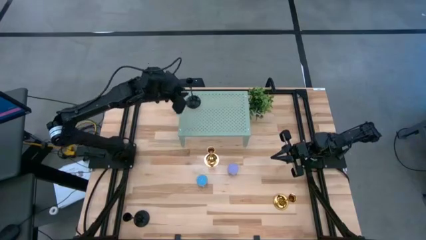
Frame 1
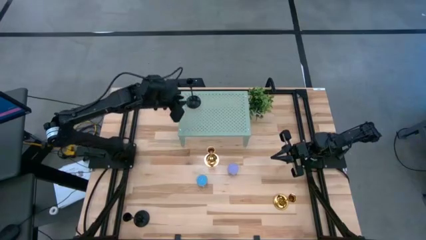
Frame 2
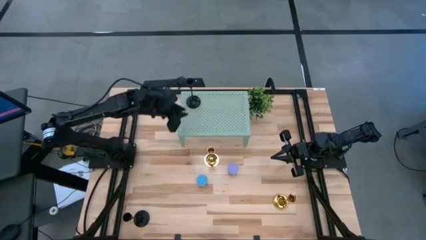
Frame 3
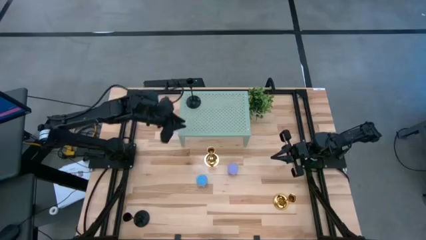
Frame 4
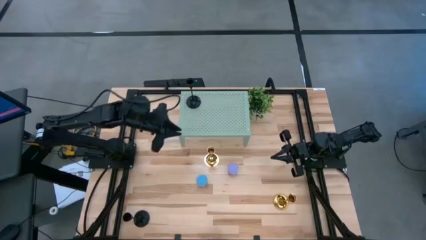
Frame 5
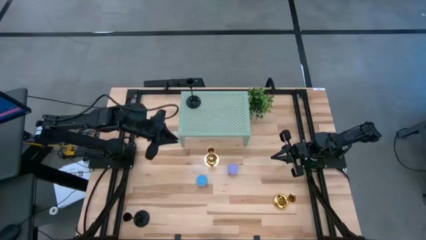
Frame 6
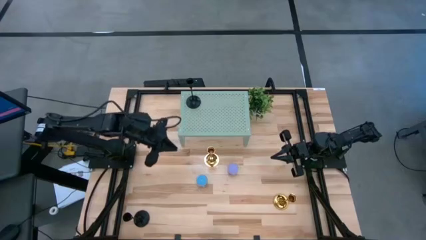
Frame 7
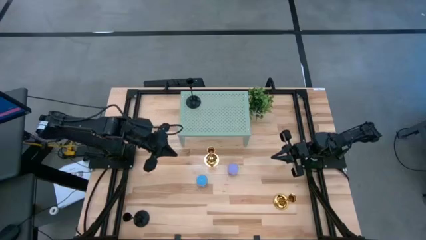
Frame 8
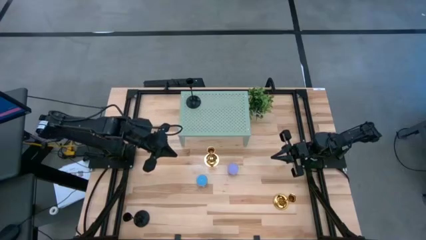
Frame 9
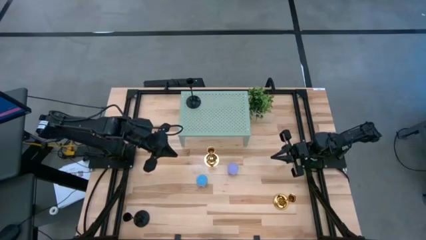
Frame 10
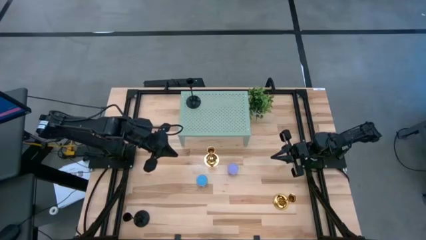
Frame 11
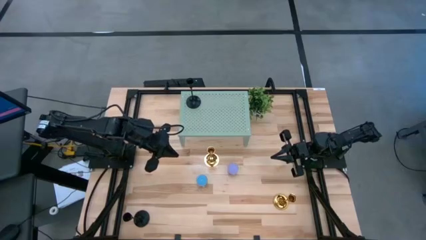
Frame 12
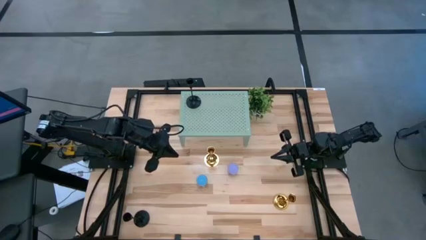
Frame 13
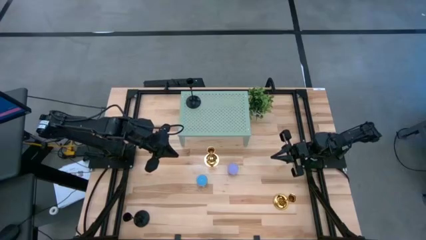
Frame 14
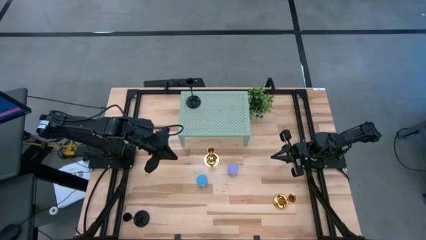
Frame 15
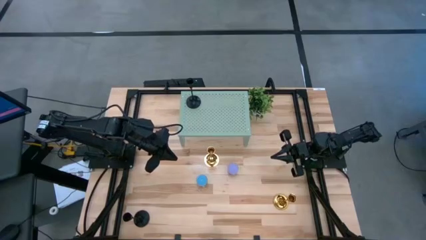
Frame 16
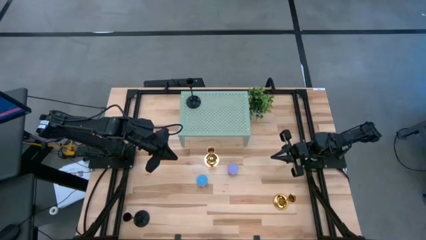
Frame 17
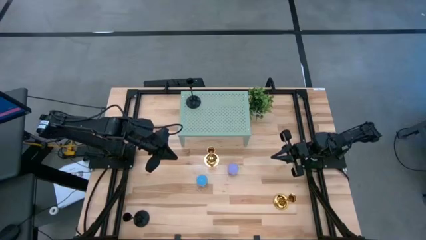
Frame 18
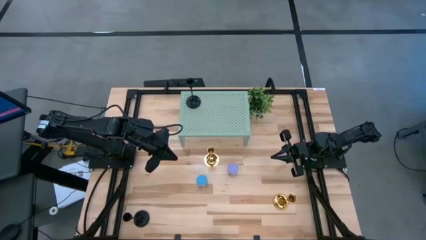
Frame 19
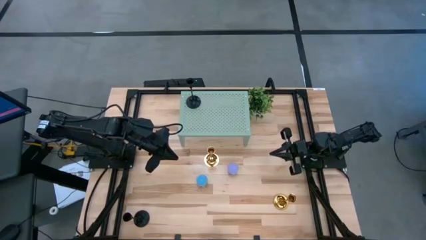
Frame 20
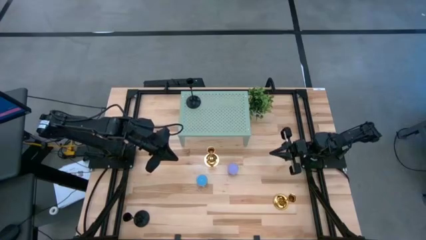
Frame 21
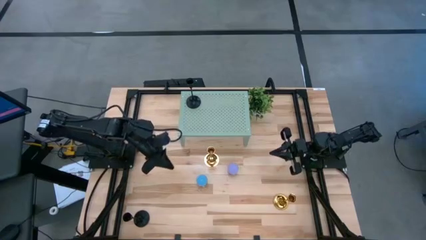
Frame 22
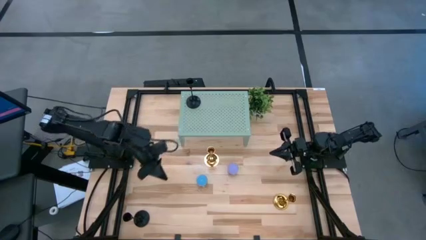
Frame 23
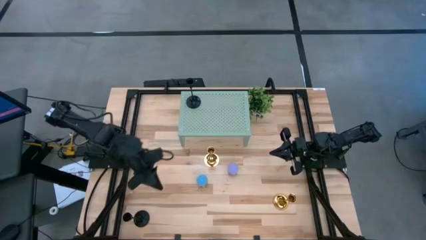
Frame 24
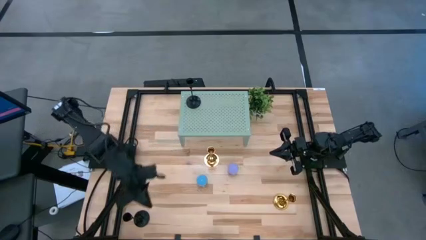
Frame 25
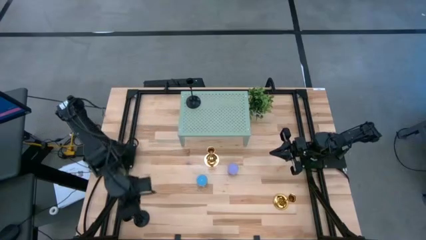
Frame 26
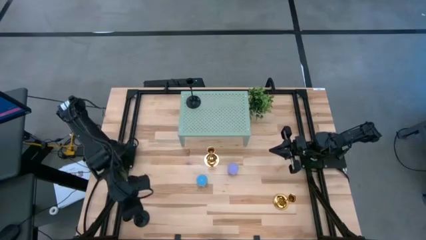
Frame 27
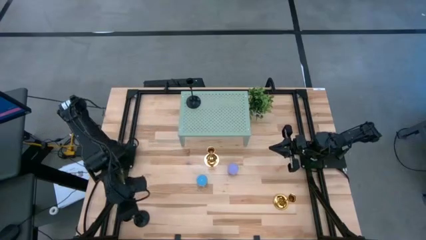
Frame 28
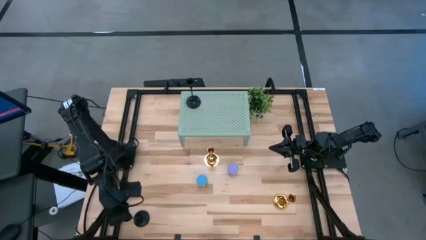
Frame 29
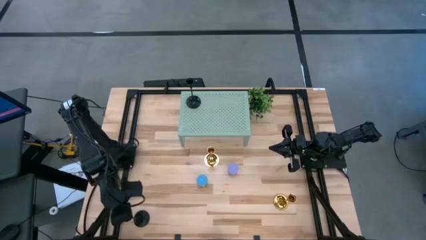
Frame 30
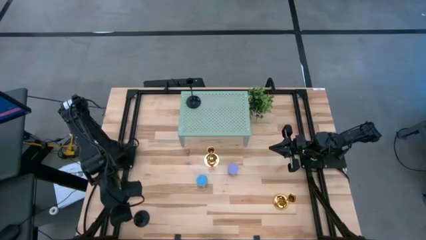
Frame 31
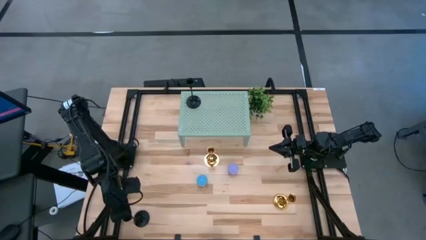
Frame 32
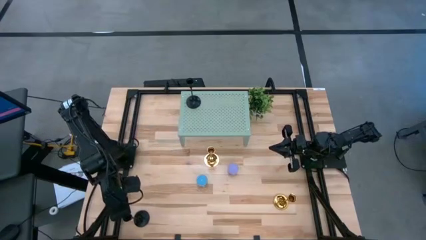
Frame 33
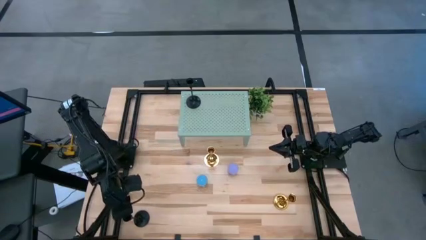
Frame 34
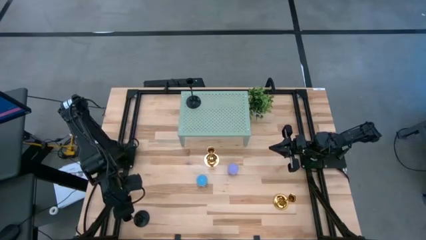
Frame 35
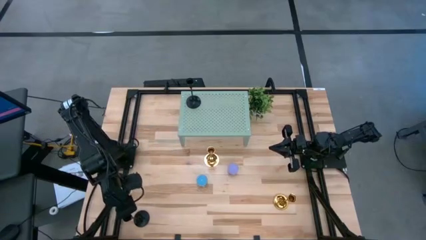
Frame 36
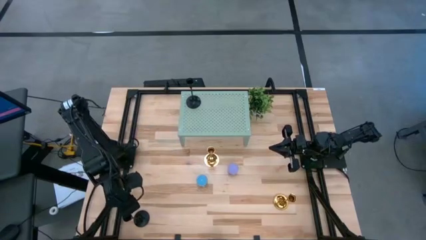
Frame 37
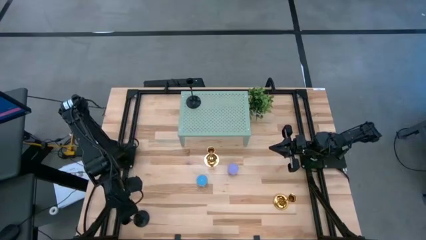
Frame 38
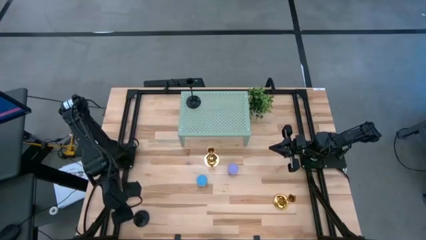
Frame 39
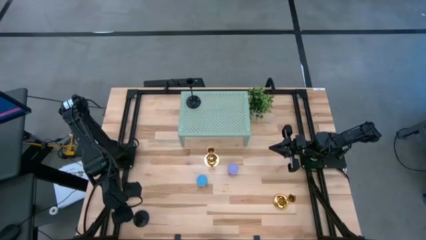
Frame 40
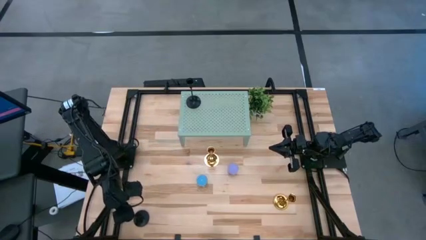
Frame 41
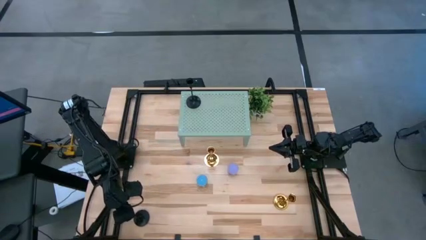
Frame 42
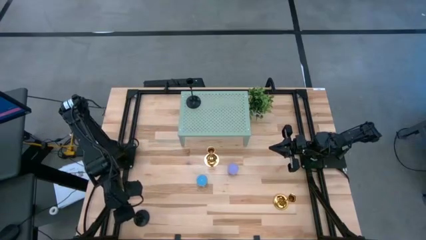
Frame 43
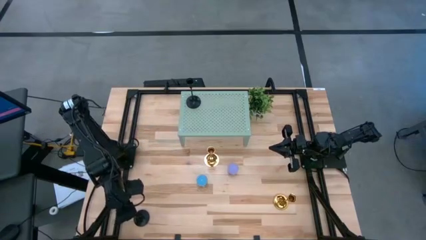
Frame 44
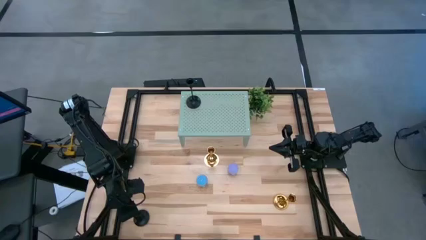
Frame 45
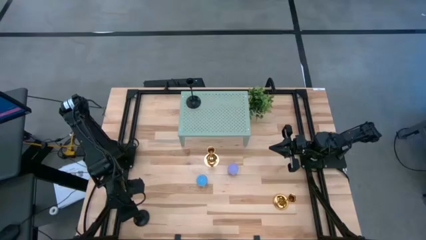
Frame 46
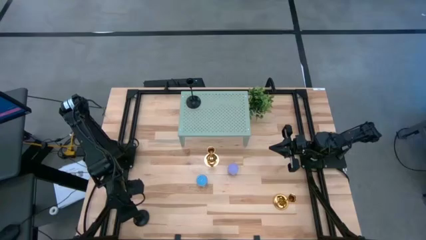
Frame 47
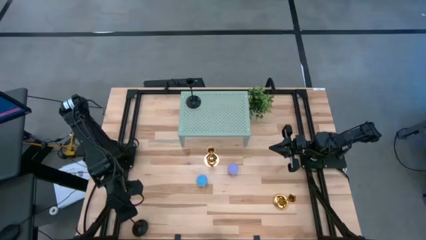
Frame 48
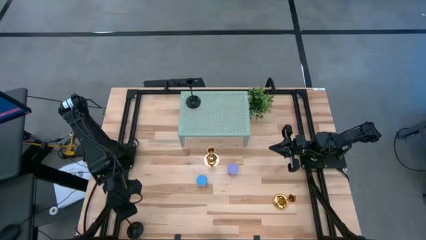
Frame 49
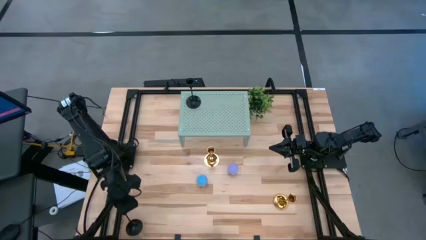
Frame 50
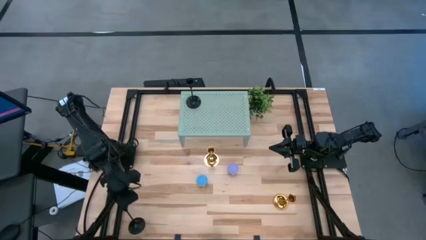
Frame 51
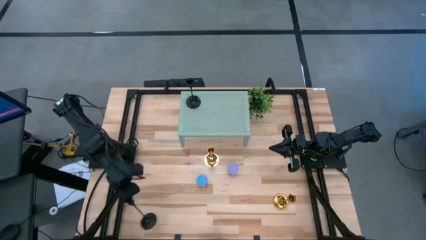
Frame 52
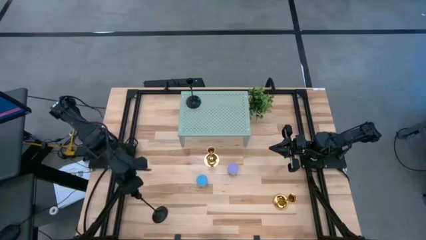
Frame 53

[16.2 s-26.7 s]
Task: Pick & Place candle stick holders
Put the black candle holder on the shelf
